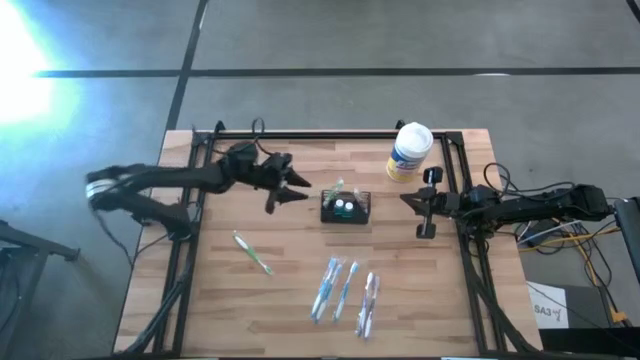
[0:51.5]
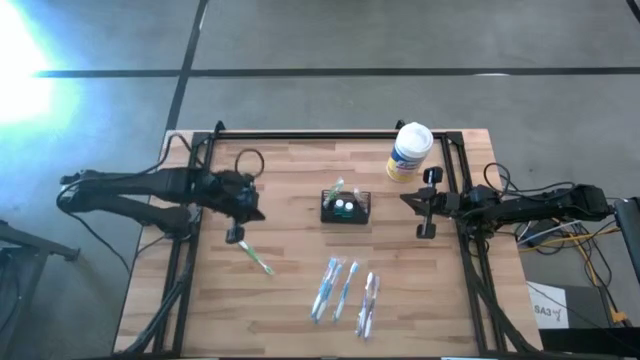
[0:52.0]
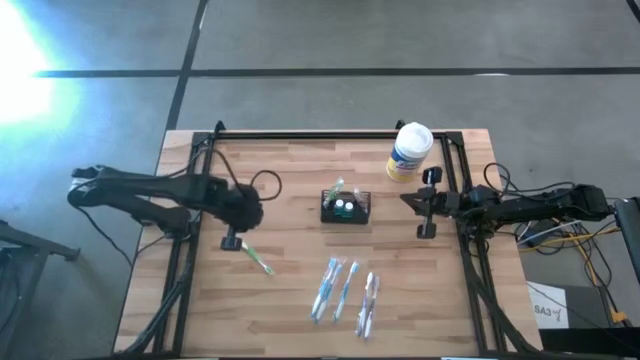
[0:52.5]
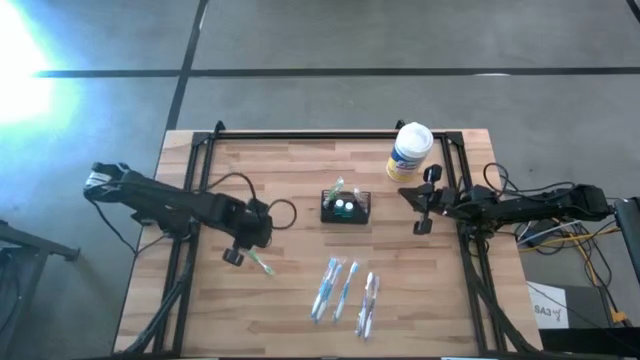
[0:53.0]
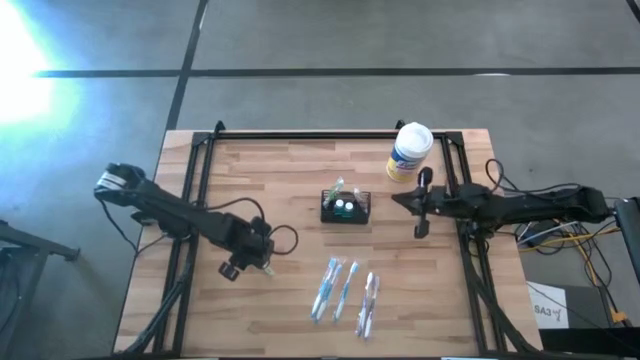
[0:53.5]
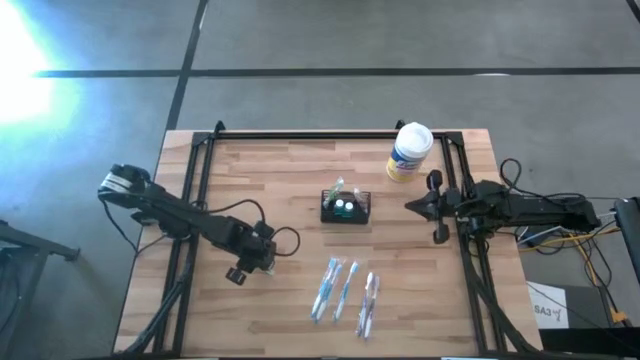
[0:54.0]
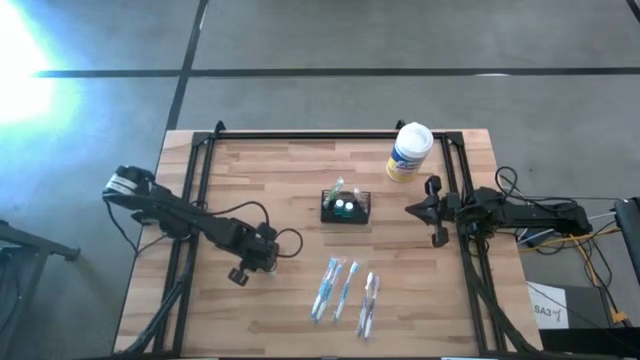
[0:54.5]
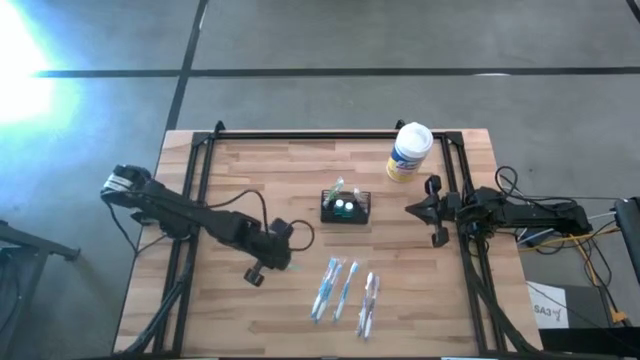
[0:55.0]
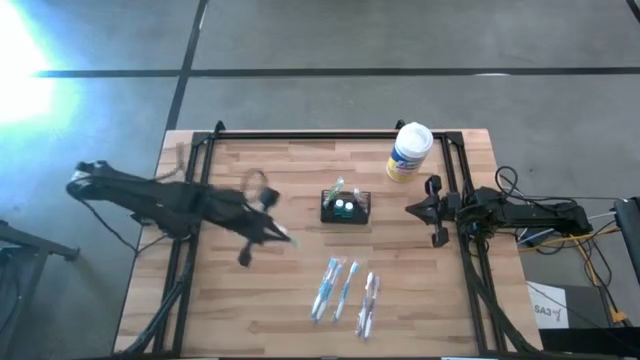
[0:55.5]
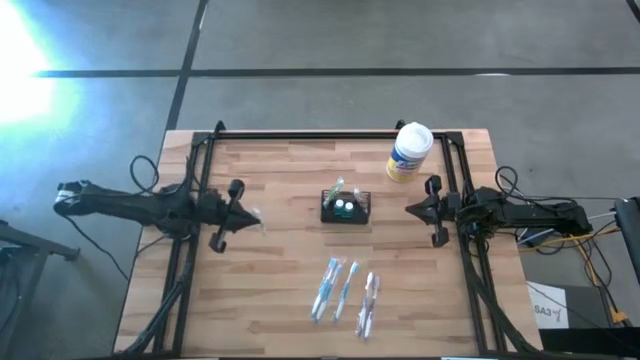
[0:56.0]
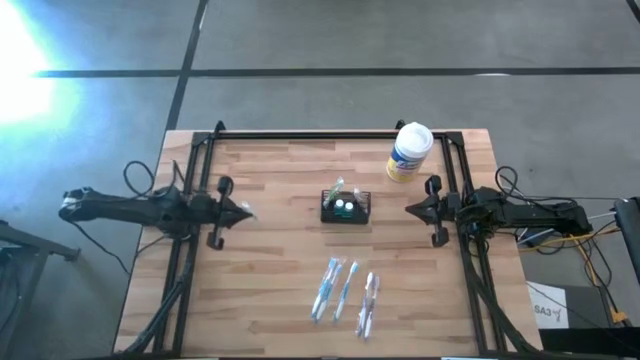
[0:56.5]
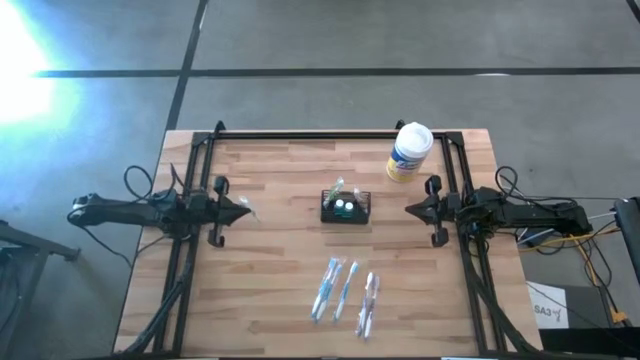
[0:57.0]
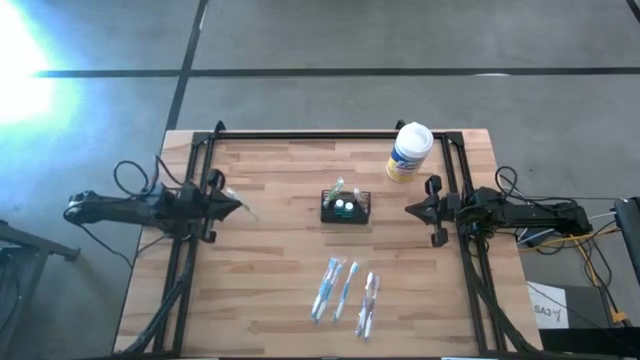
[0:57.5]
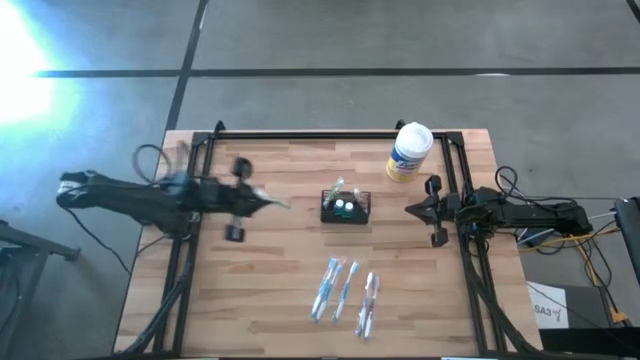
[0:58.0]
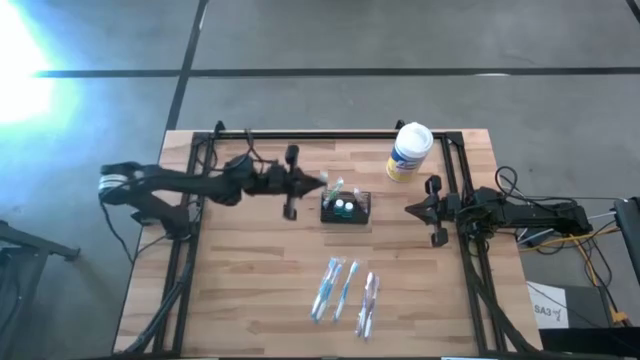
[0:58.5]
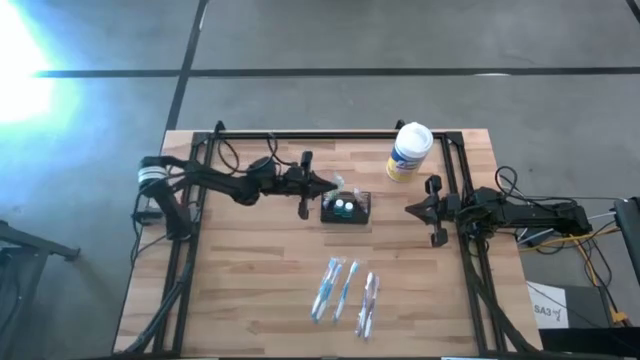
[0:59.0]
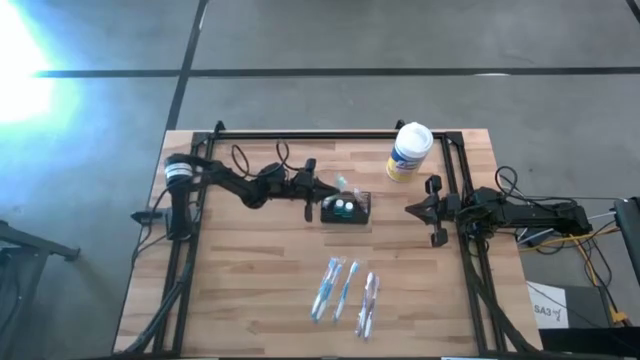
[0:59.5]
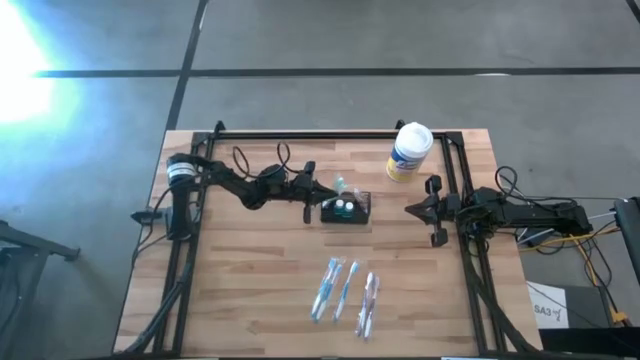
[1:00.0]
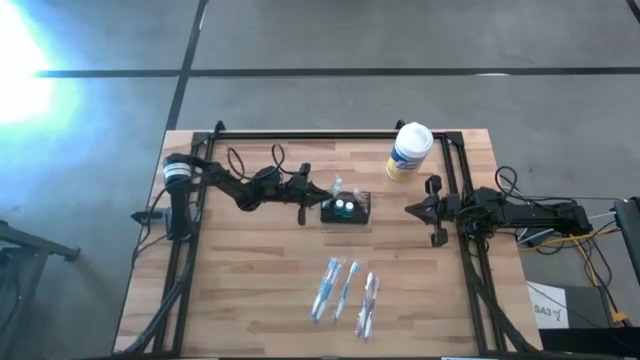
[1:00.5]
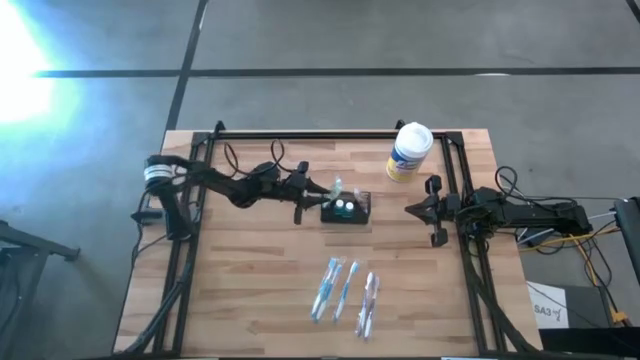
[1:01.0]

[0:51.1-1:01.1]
Task: Pick & Place toothbrushing station
Put the green toothbrush into the wire organizer

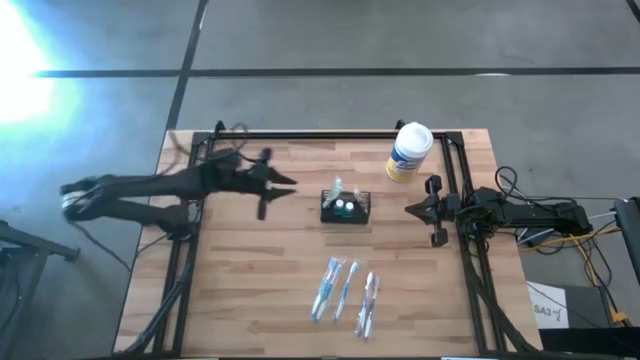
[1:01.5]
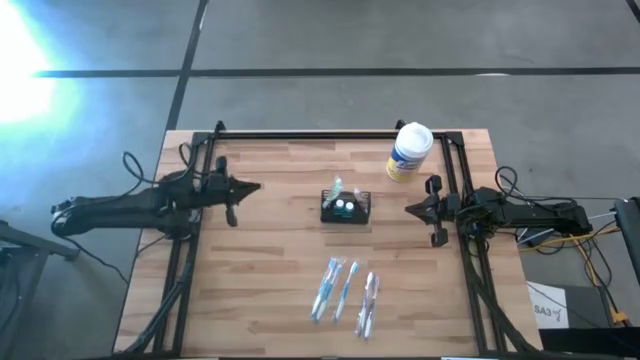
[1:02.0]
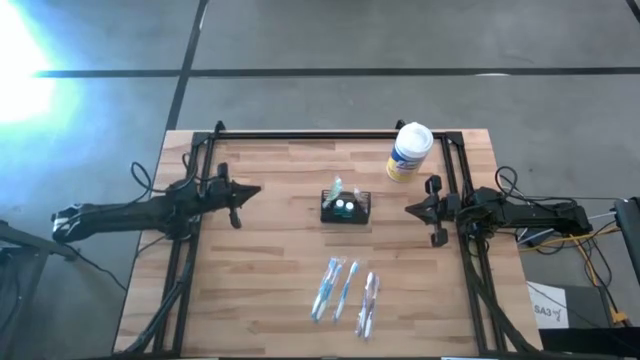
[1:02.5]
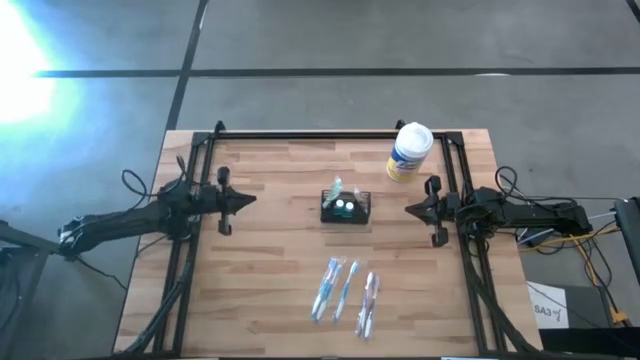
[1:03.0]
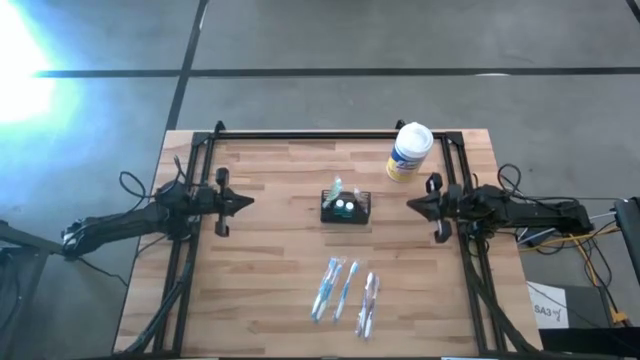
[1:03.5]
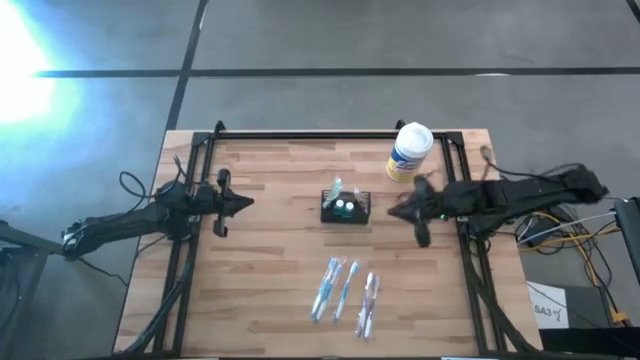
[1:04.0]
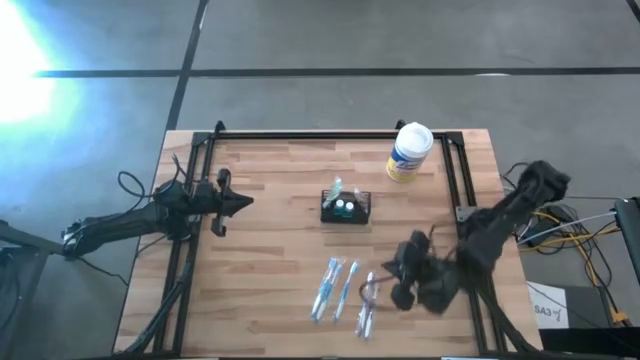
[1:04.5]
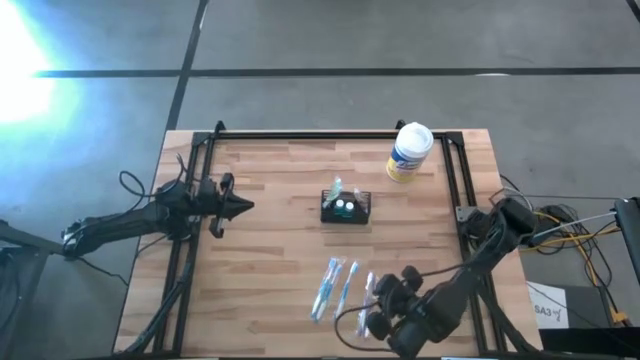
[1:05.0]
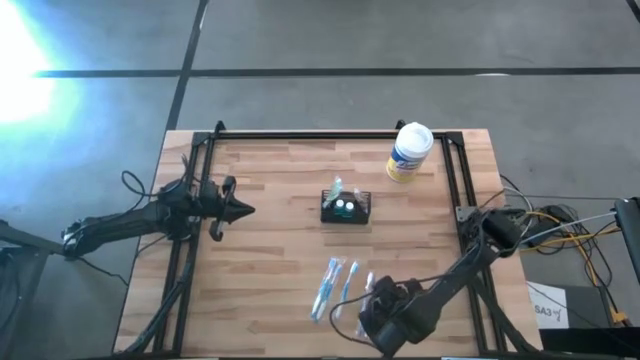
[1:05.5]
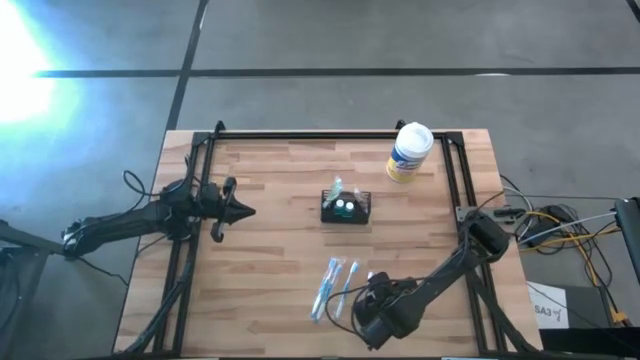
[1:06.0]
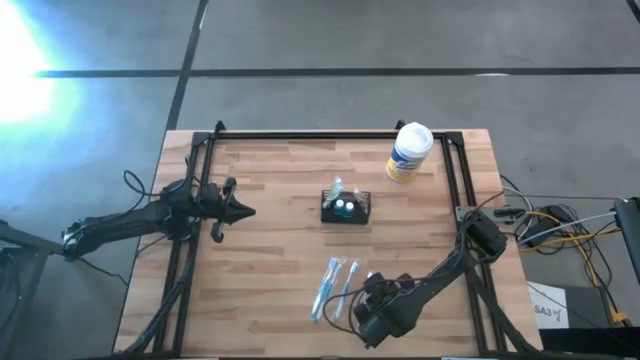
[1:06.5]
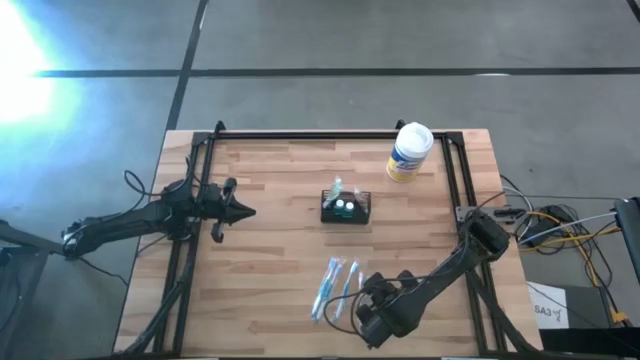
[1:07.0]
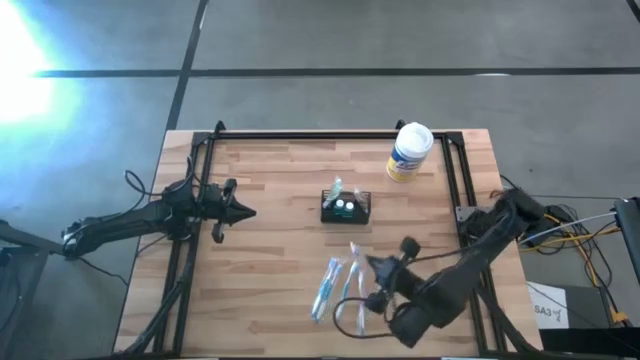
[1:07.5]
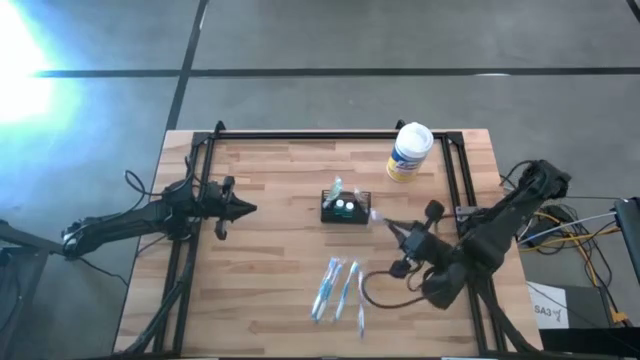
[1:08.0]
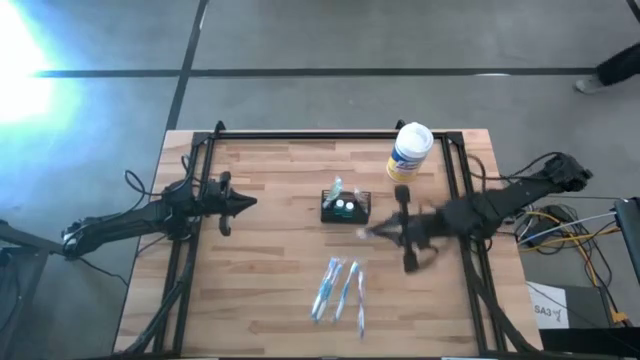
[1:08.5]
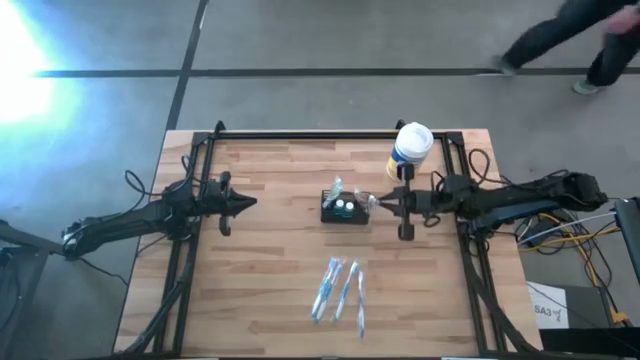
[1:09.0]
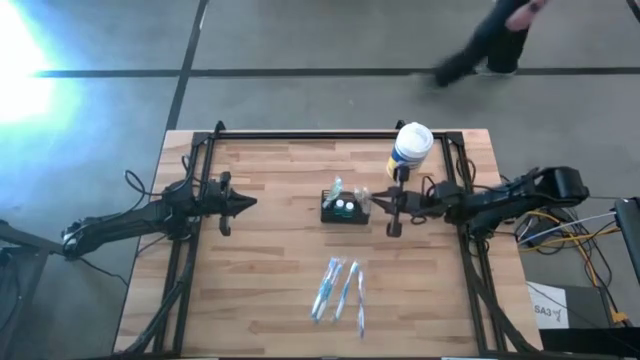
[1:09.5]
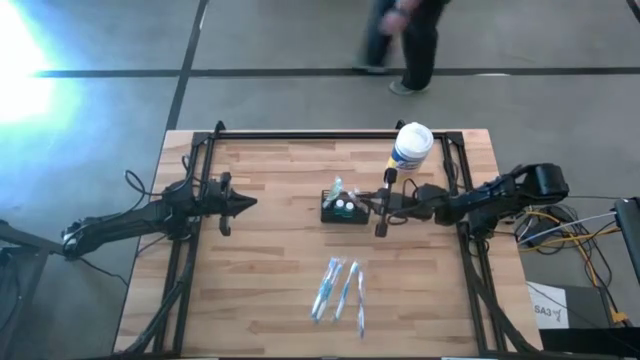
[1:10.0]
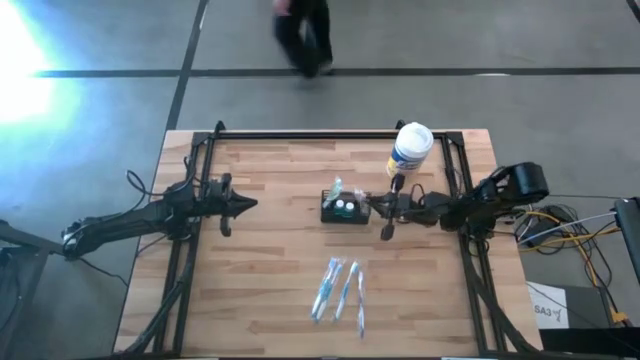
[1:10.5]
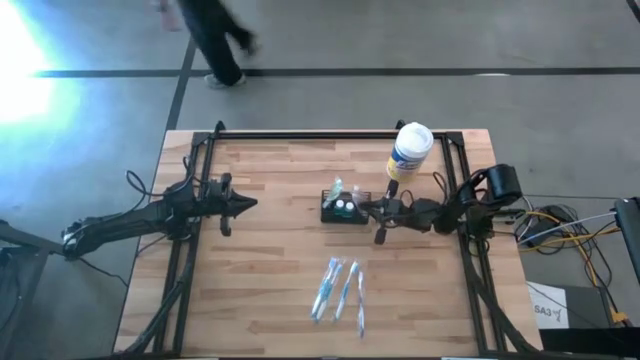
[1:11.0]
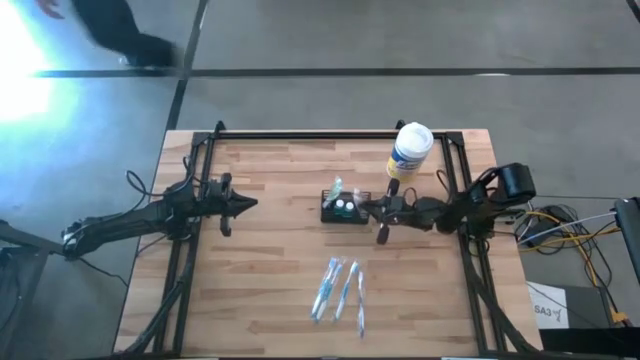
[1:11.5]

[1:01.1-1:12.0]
Put the right violet toothbrush into the wire organizer
